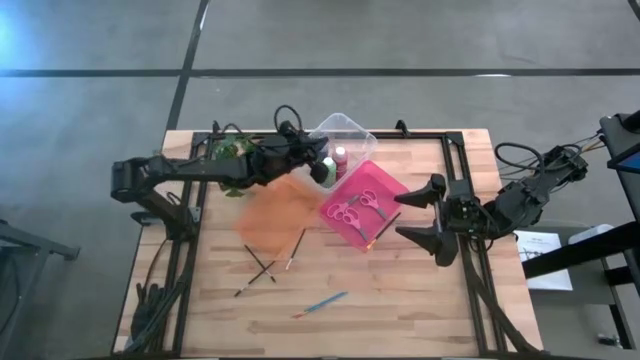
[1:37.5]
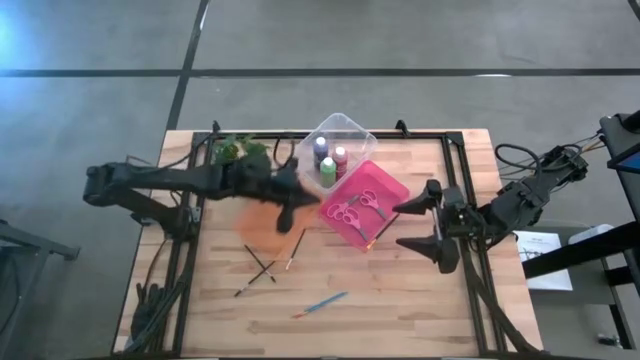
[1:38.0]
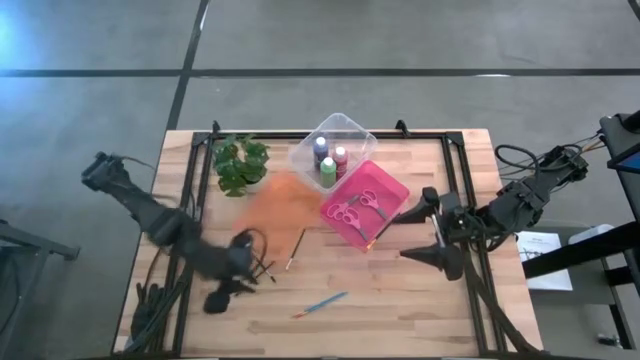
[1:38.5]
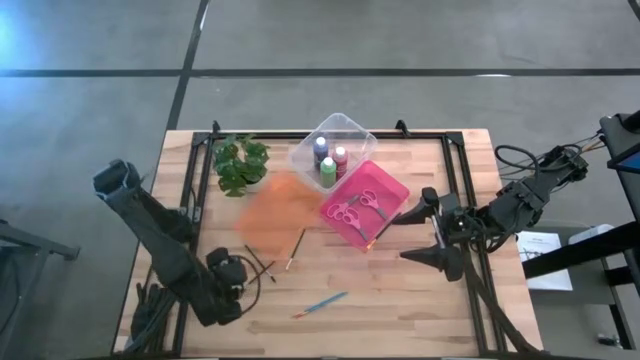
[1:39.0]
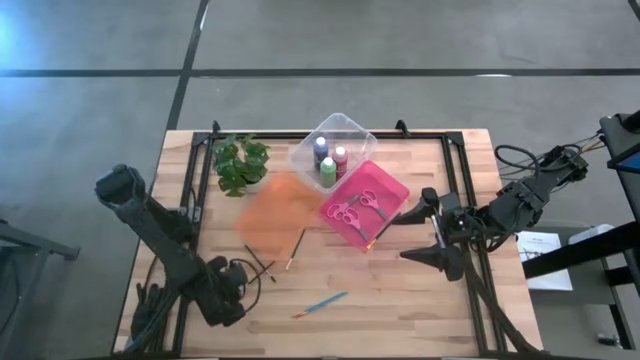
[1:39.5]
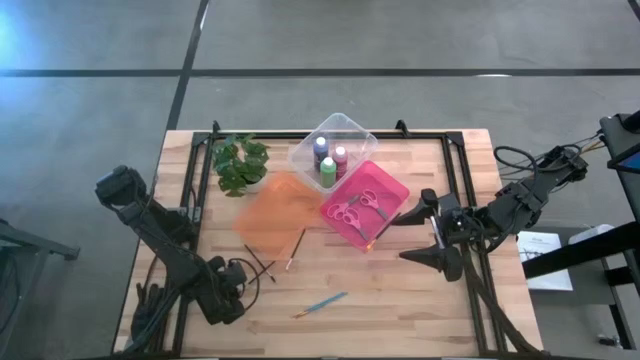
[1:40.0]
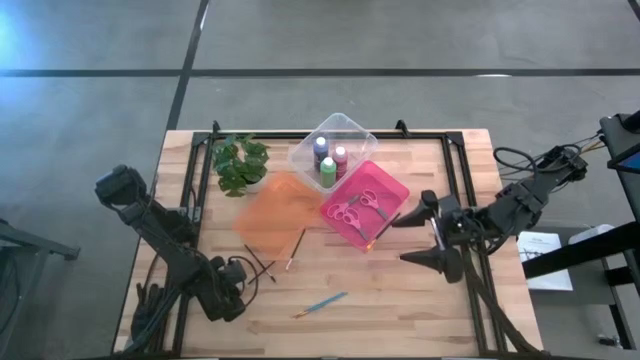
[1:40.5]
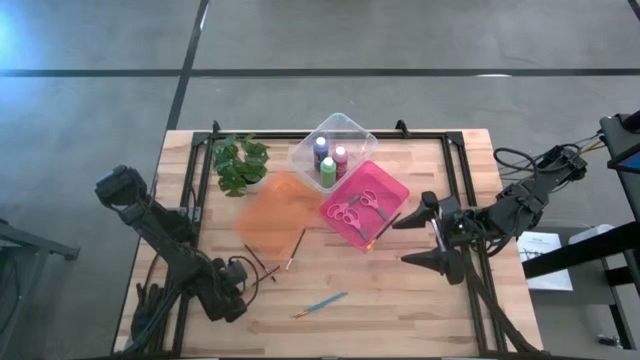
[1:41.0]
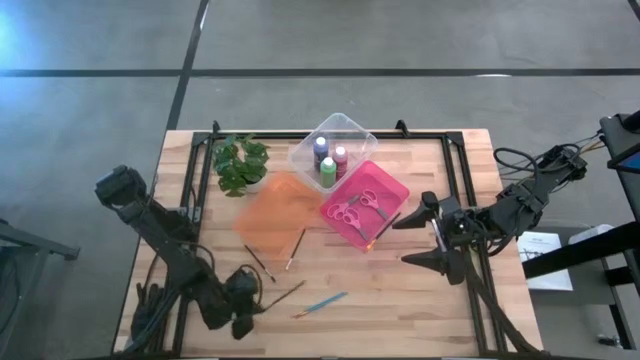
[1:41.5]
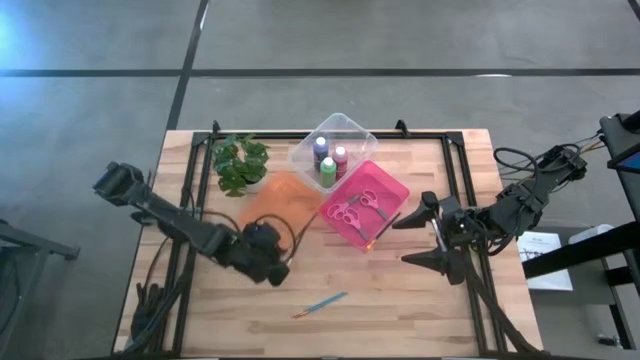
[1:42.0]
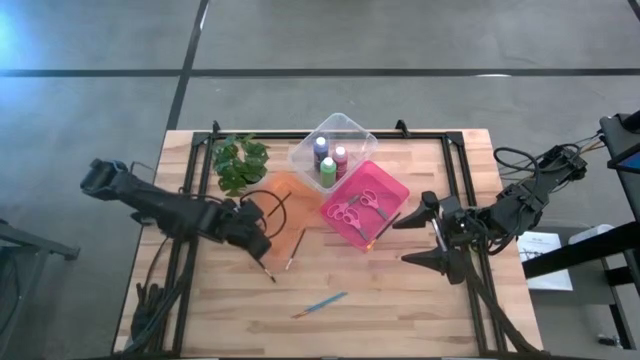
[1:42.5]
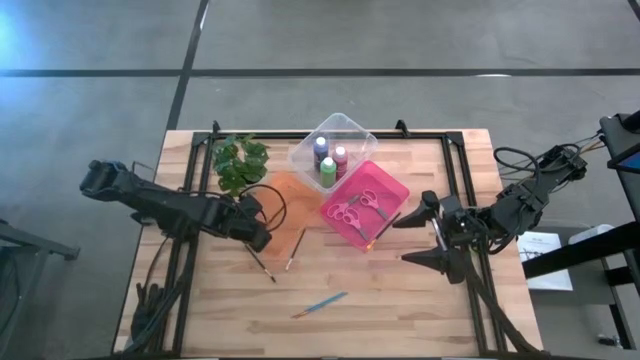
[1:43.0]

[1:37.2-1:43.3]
Task: Pick & Place Paint Supplies
Put the bottom black lash brush into the yellow bin

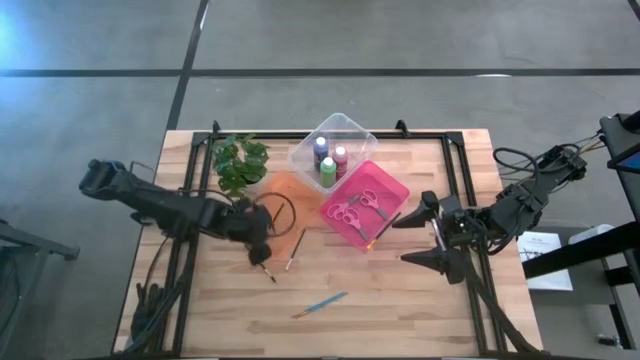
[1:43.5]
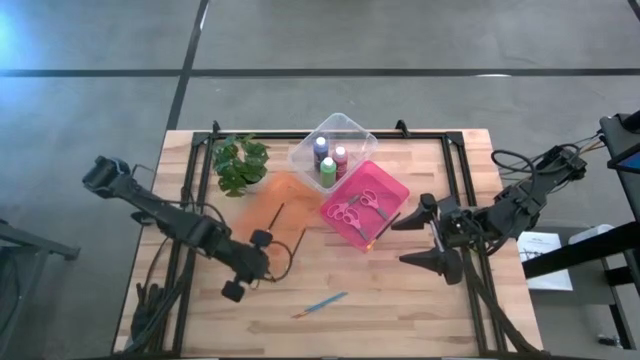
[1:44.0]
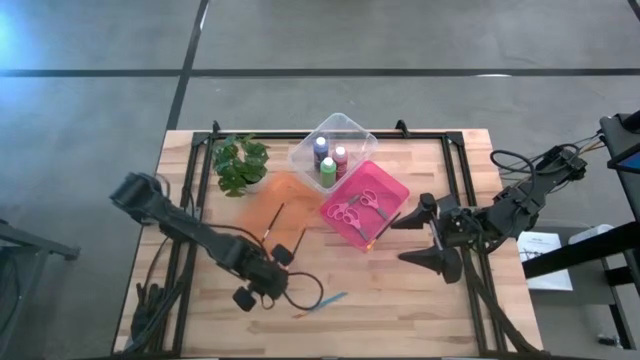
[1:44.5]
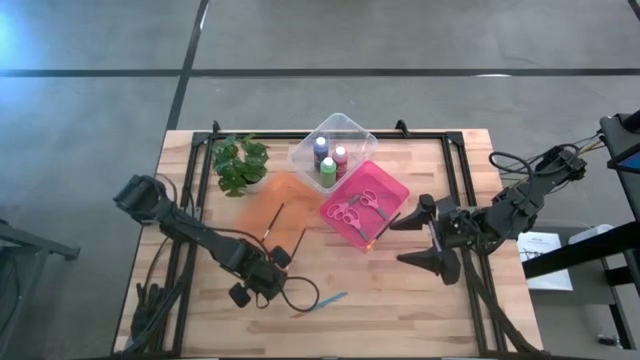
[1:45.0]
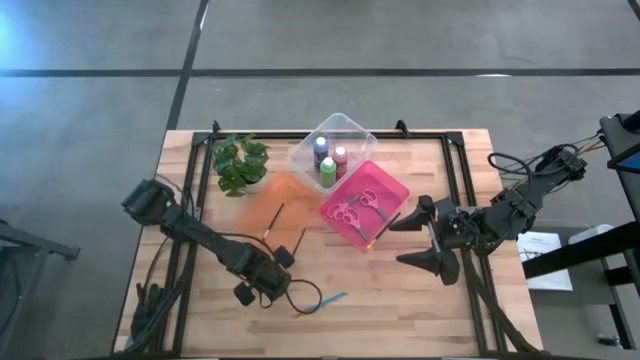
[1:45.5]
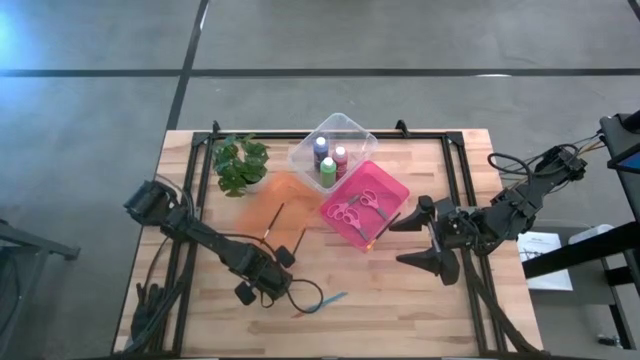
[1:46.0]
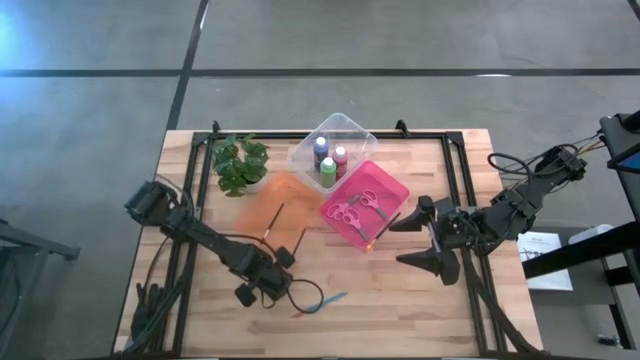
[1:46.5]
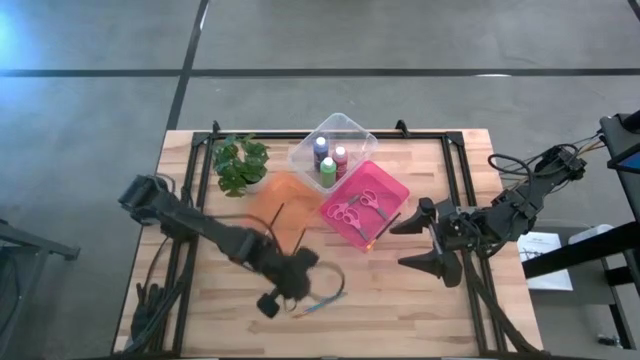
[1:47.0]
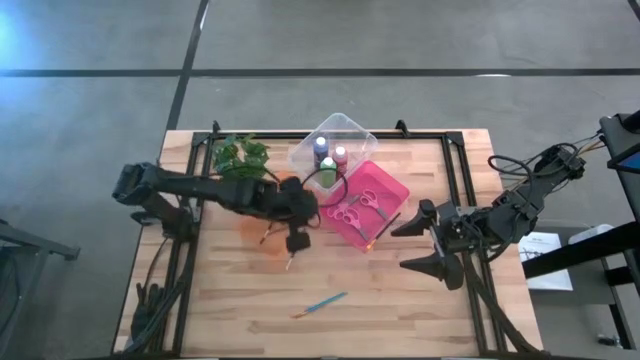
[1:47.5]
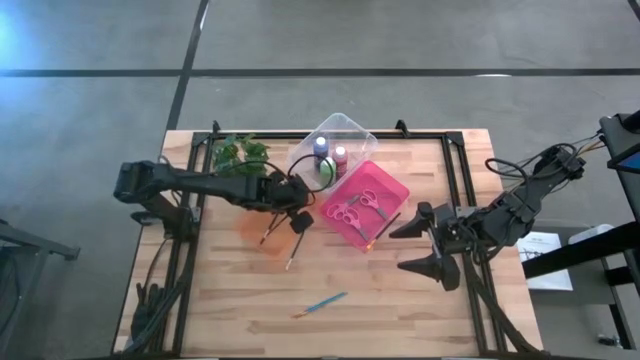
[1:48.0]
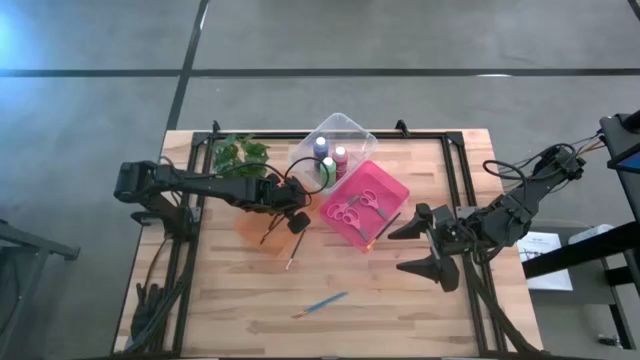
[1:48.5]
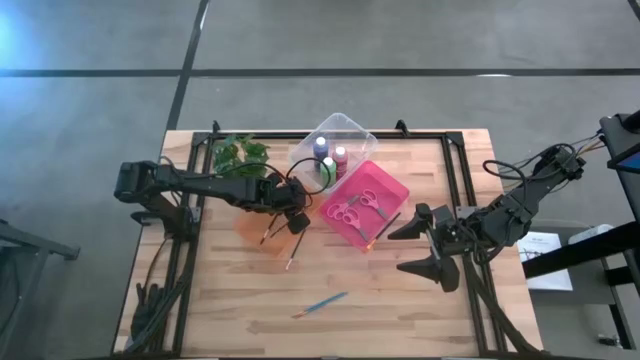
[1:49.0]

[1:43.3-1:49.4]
Put the black lash brush into the yellow bin

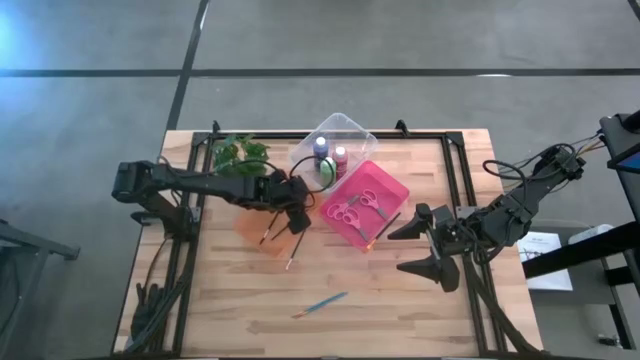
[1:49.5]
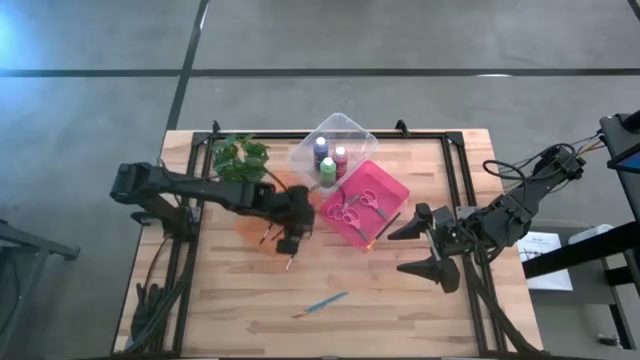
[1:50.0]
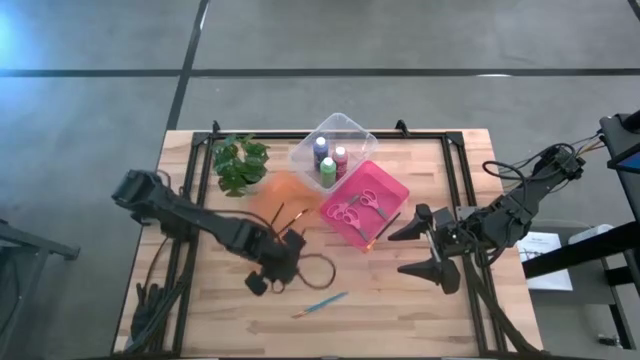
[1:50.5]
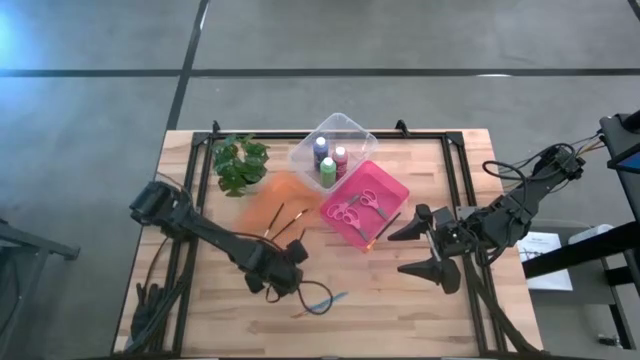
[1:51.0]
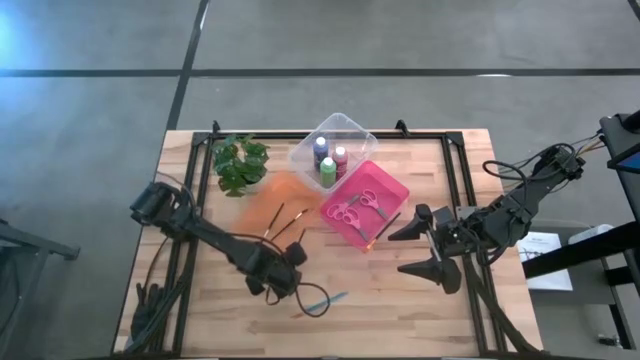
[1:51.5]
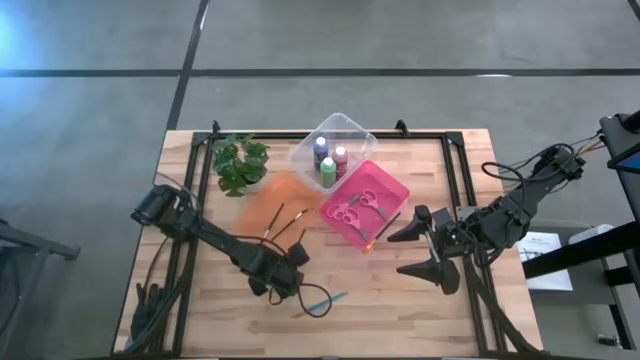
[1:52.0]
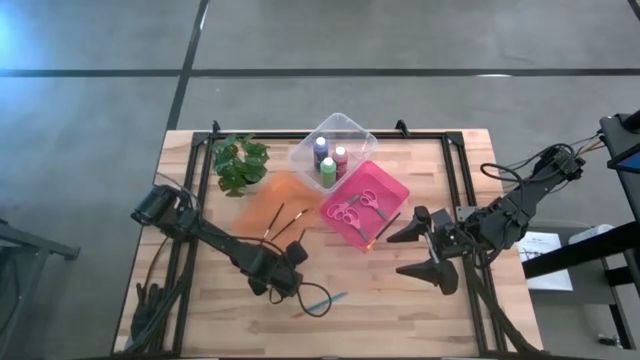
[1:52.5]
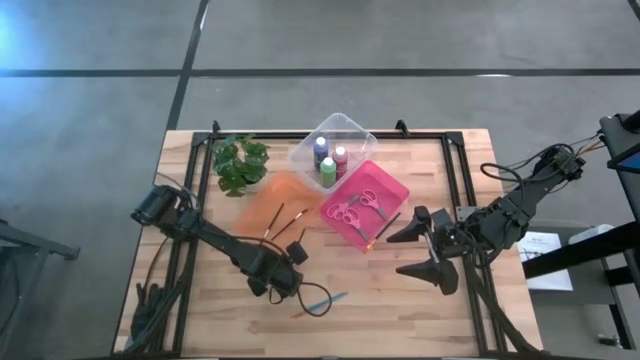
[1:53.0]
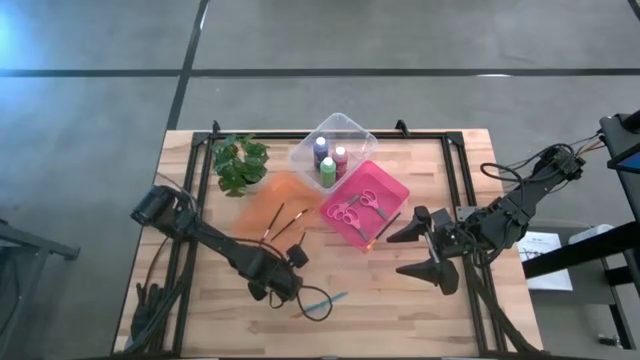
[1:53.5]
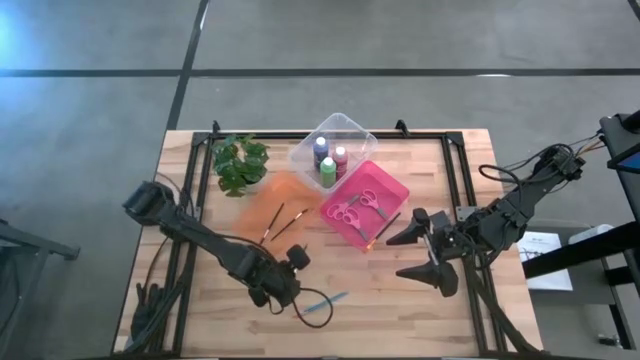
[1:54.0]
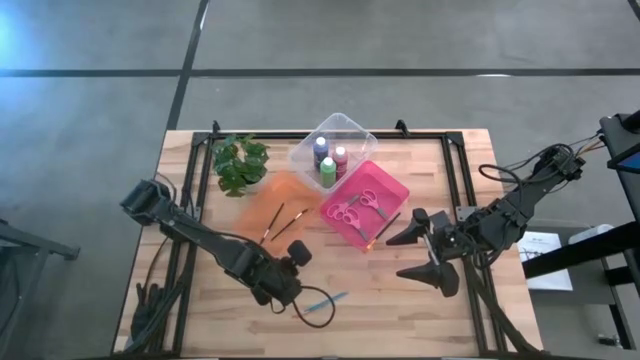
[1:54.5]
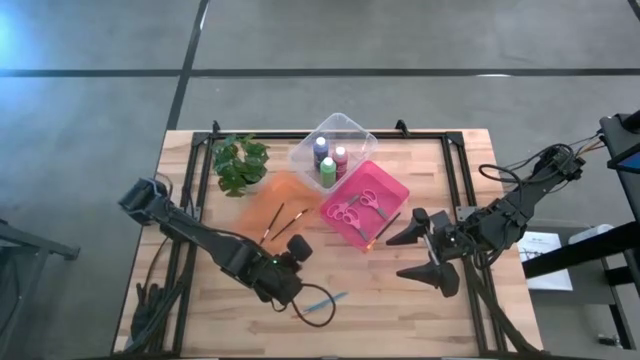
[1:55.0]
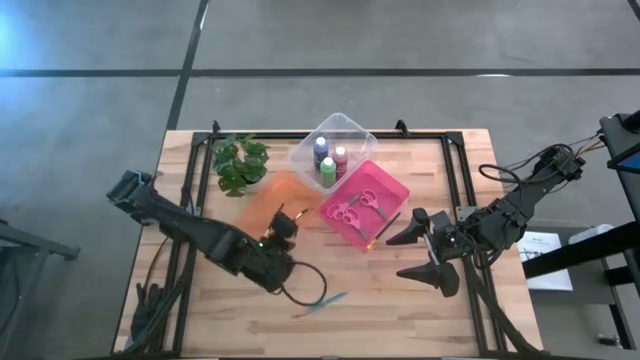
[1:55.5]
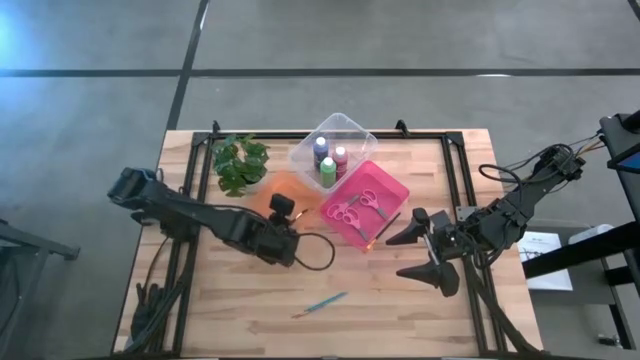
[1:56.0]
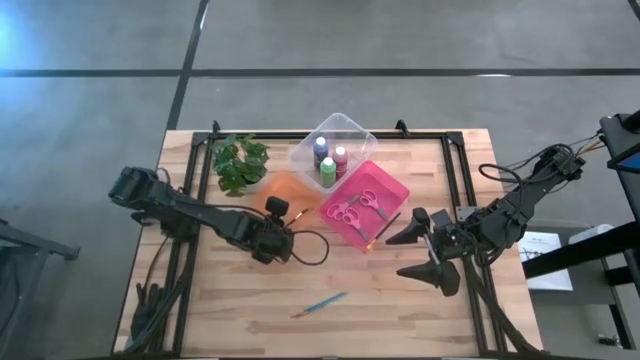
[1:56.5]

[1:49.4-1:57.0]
Put the black eyeshadow brush into the yellow bin

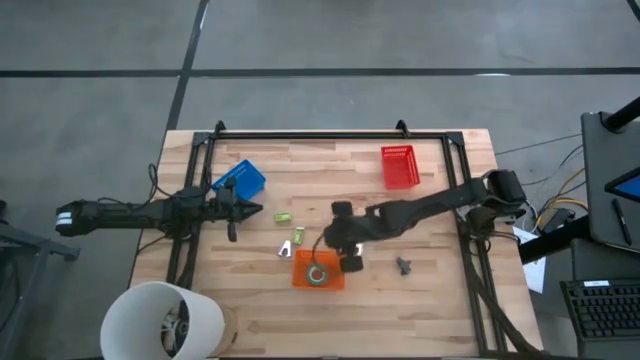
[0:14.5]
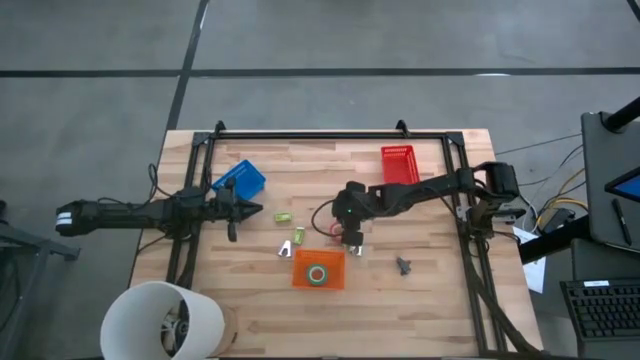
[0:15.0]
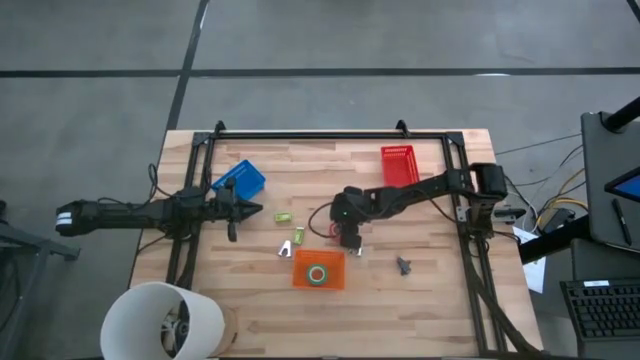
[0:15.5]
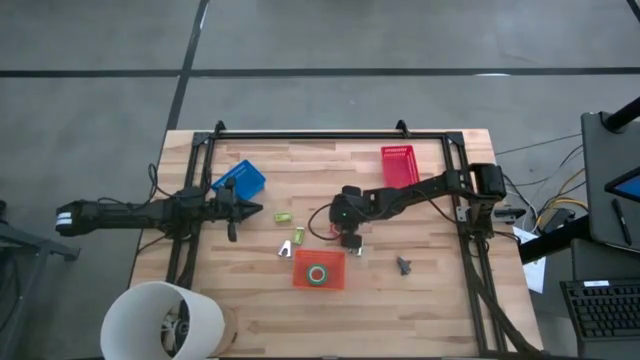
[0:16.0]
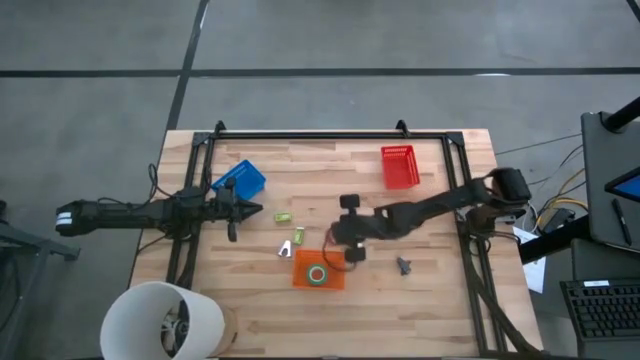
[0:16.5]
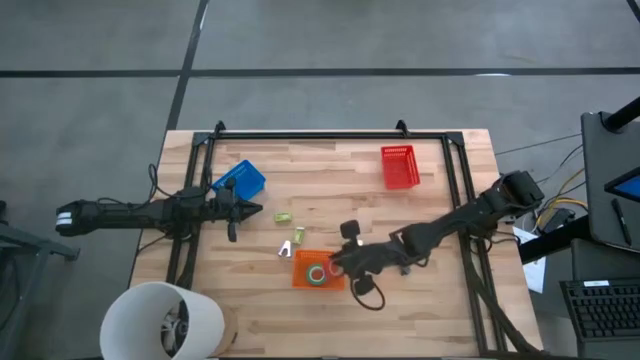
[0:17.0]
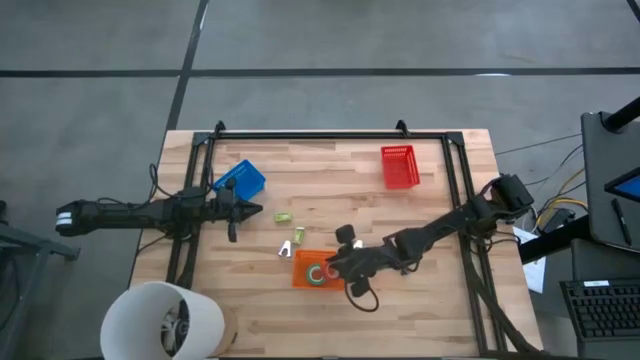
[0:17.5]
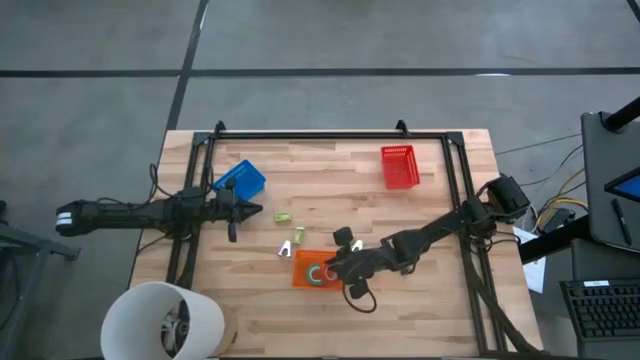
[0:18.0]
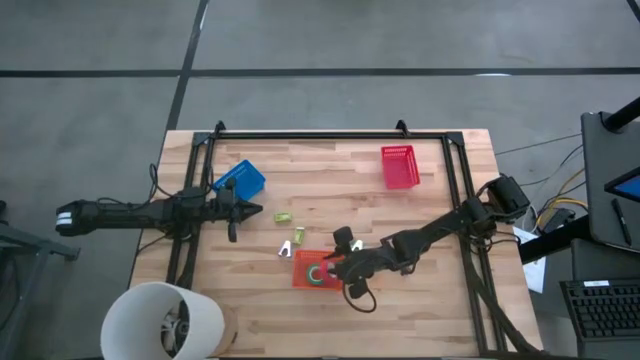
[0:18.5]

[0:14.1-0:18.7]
Task: Pick and place Stapler, Stapler remover, tape
Put the red tape into the orange bin
